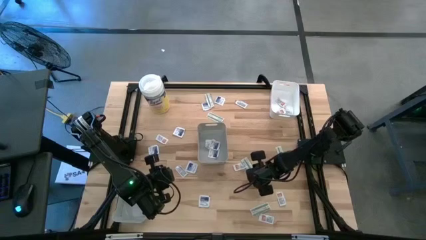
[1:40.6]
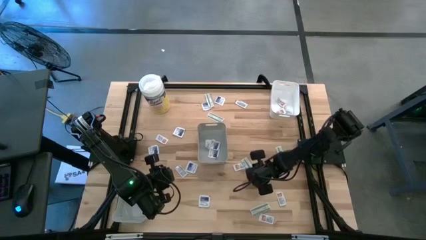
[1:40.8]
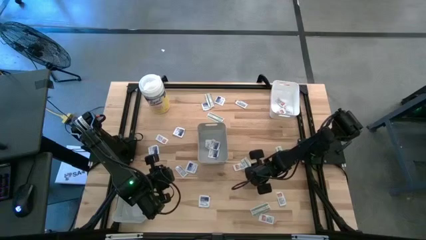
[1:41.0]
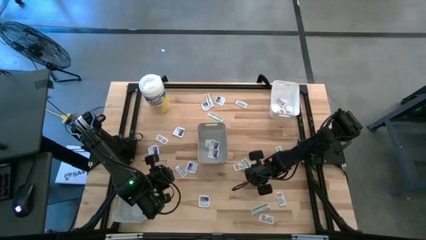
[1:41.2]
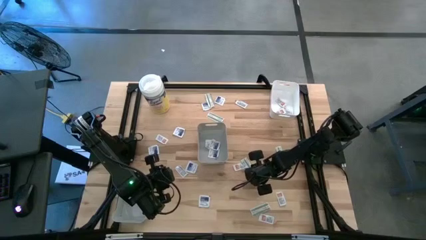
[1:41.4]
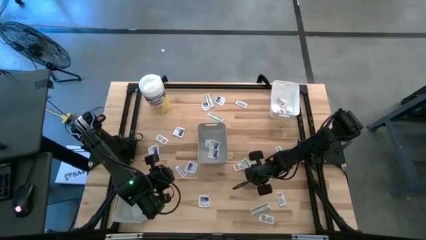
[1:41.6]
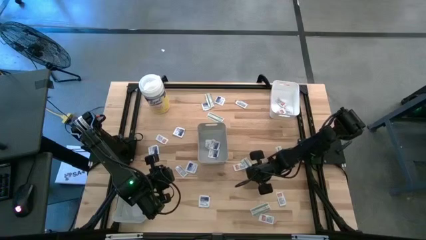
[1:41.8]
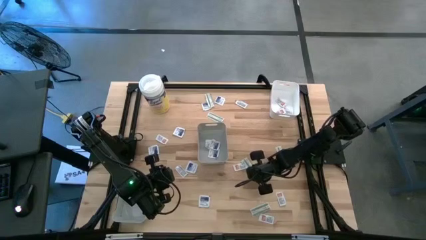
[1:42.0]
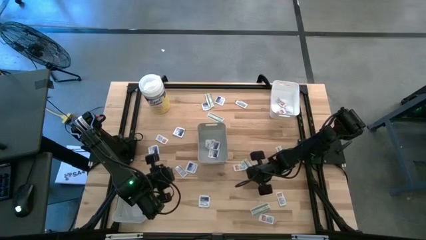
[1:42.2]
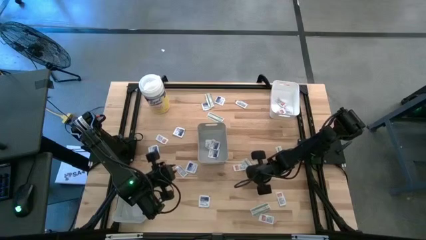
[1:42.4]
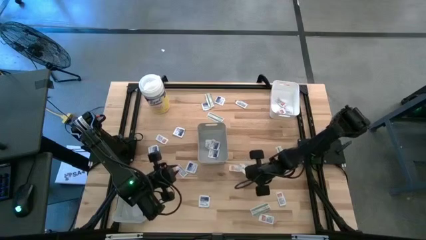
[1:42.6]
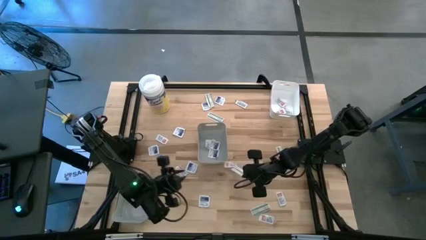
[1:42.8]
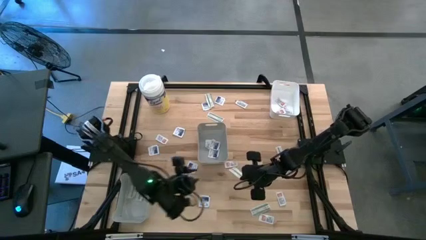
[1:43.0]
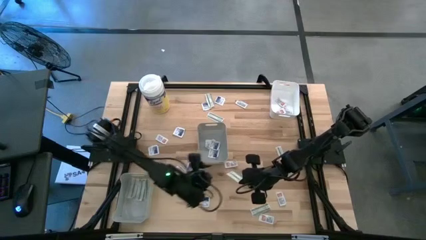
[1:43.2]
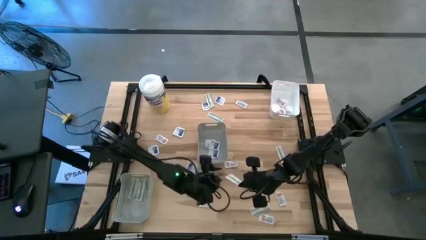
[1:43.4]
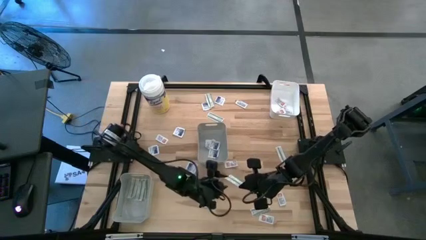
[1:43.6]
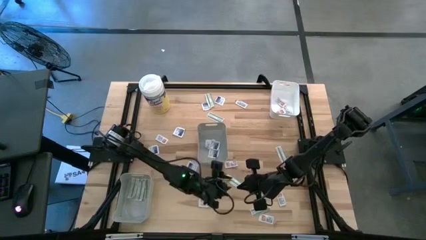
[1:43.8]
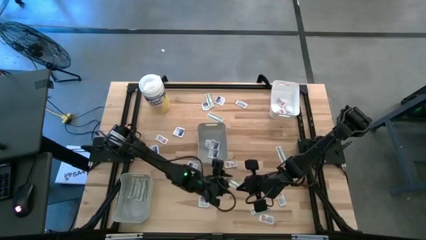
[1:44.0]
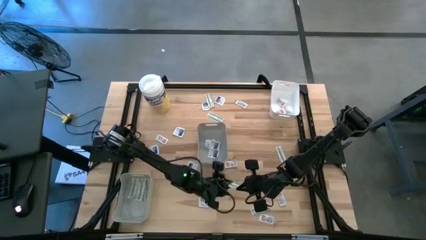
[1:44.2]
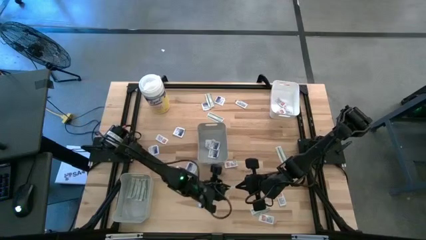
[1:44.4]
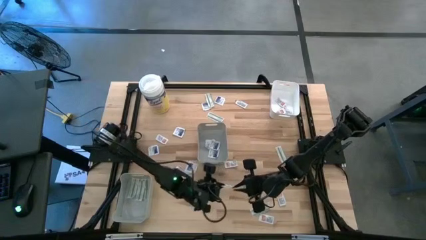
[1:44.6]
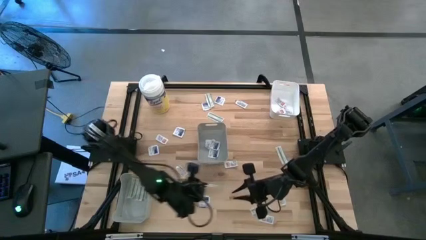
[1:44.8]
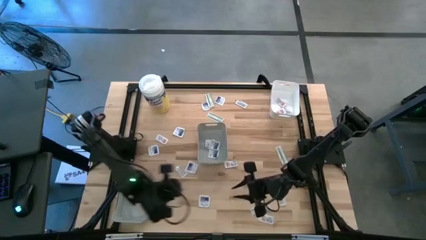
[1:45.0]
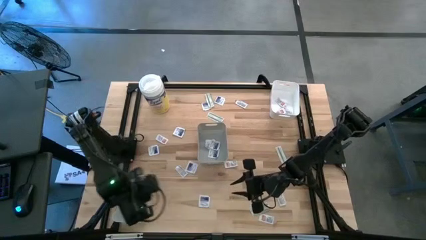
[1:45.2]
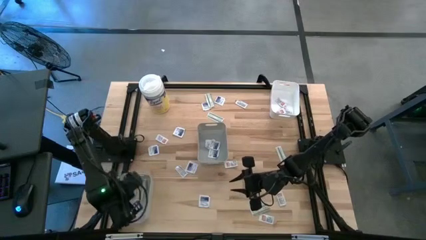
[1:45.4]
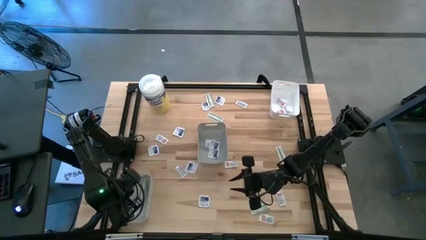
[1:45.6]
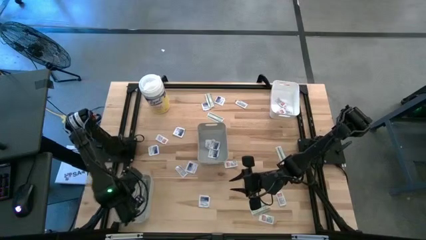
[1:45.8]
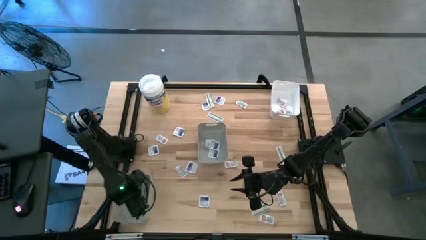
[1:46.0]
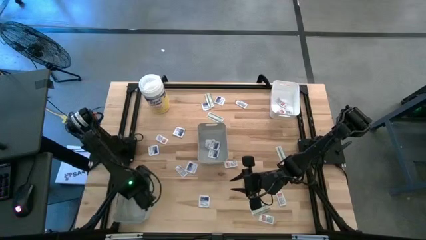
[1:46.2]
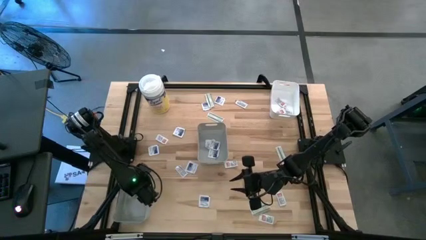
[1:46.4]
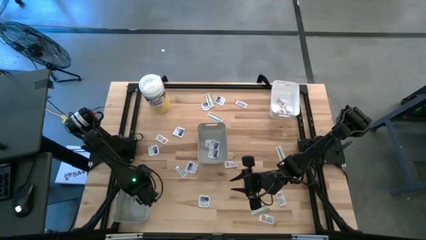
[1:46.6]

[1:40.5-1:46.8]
Task: Pick & Place First Aid Supplies
Put the green pad into the bottom gray bin

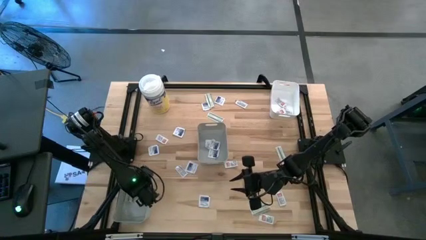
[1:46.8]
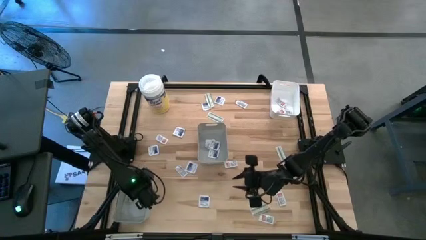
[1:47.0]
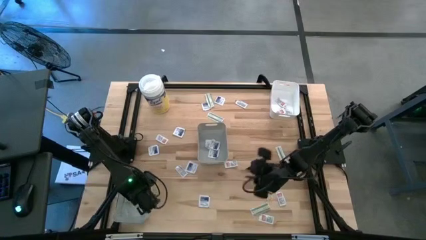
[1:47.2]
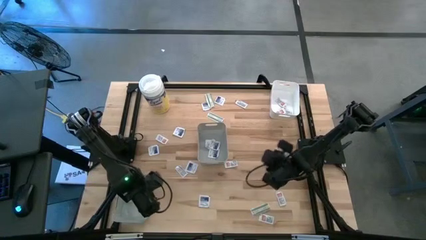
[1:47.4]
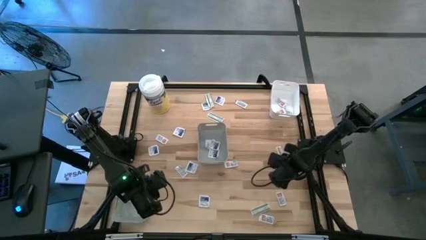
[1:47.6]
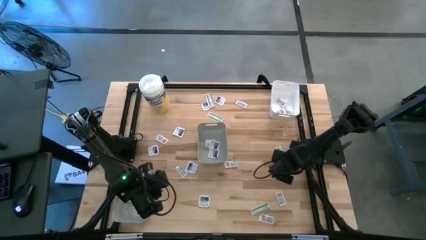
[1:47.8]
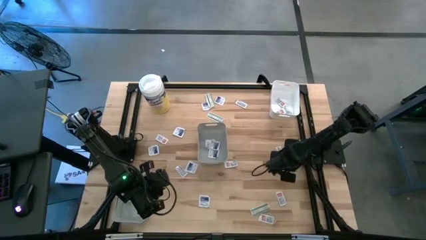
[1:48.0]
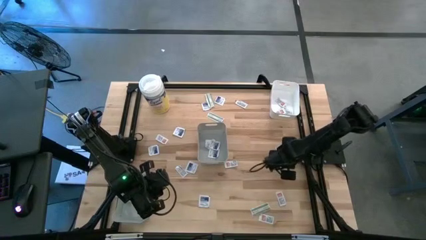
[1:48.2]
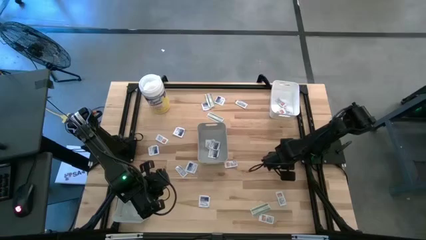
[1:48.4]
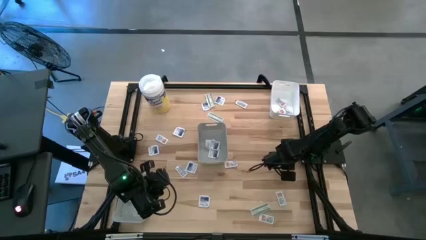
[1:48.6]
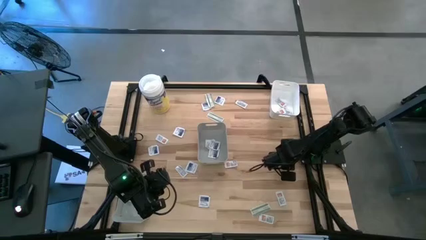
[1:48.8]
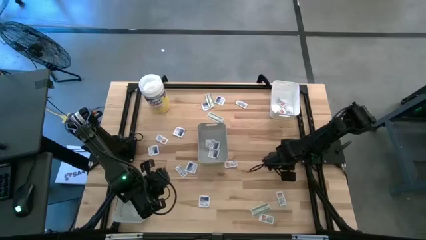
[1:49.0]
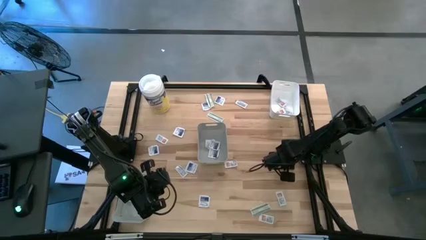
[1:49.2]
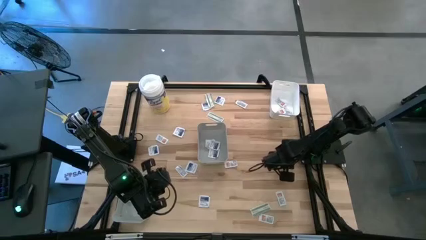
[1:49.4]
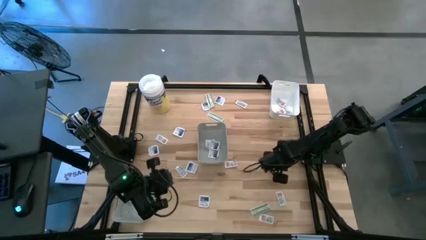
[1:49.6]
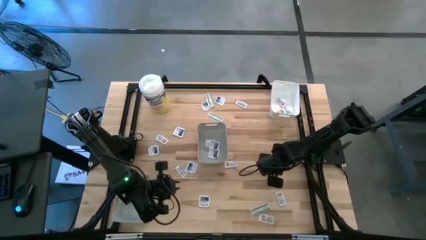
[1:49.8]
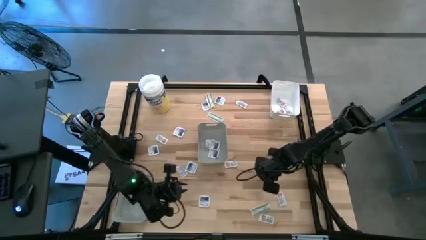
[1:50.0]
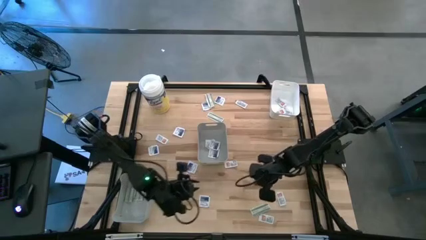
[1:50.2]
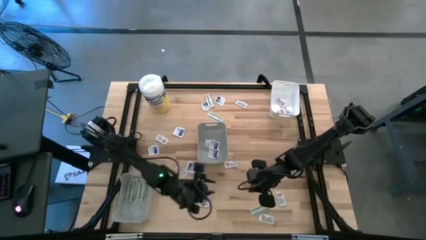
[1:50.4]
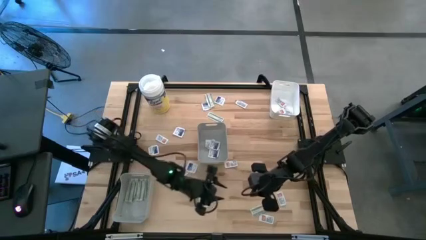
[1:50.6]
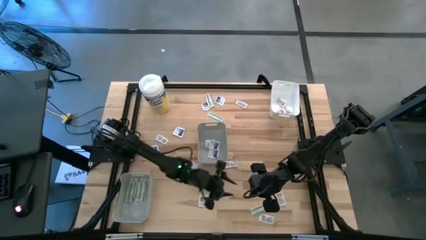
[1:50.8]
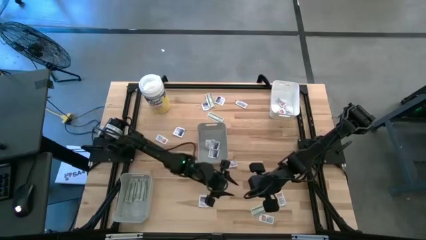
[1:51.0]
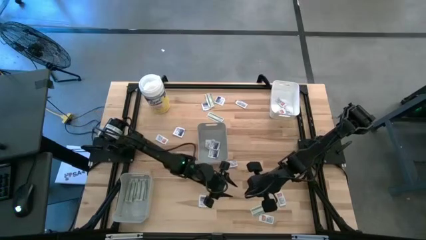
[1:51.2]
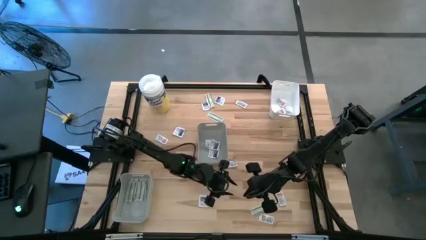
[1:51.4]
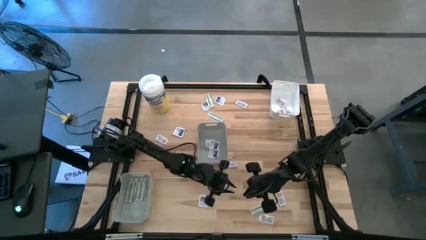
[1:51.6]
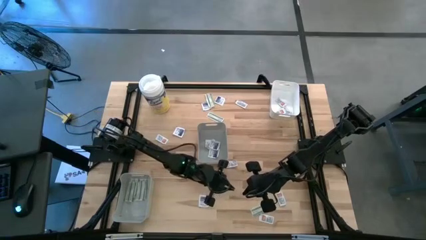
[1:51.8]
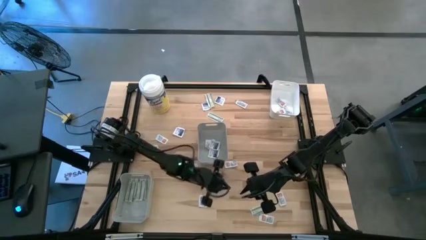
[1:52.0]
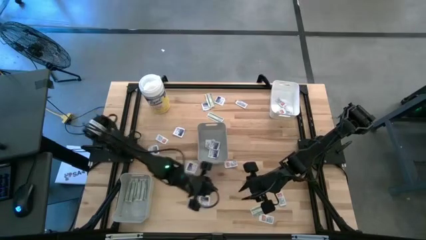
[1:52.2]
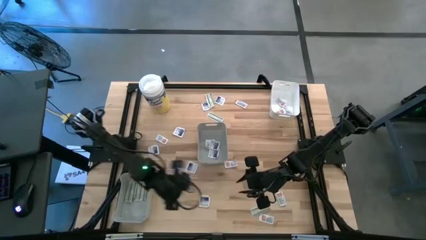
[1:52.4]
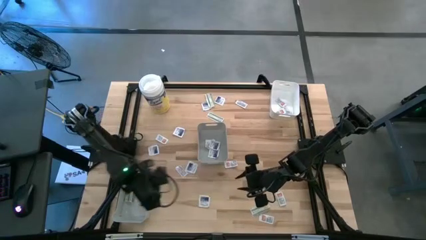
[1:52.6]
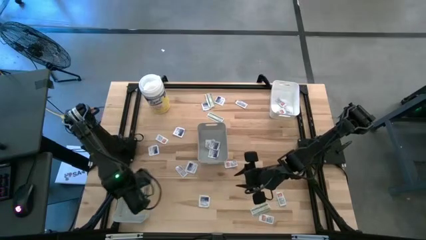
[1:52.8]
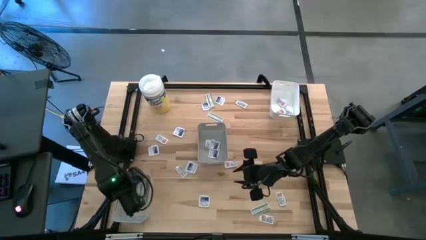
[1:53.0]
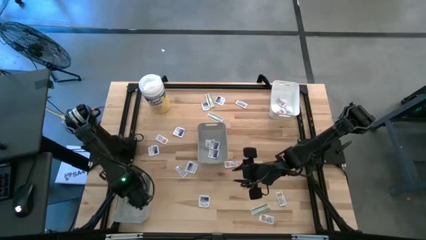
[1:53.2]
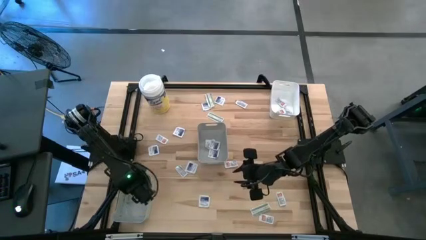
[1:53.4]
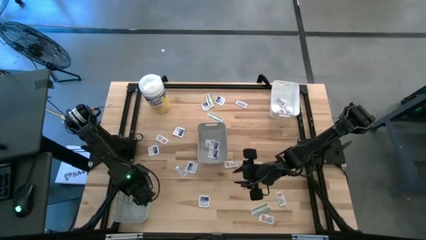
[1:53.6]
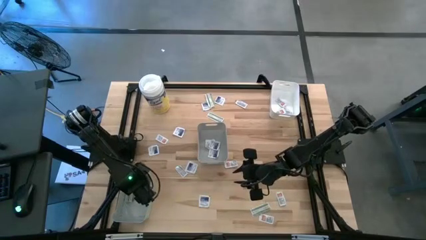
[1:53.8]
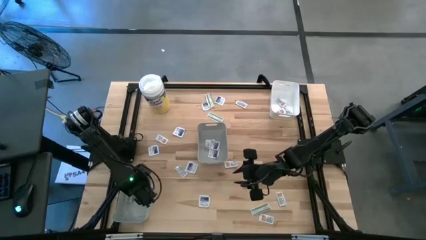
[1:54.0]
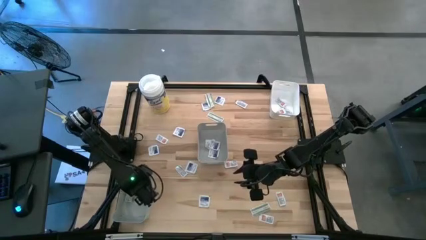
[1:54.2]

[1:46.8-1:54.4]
Put the green pad into the bottom gray bin
